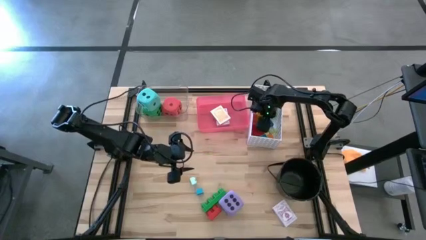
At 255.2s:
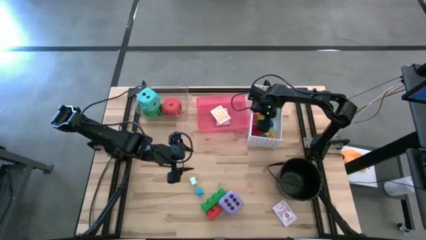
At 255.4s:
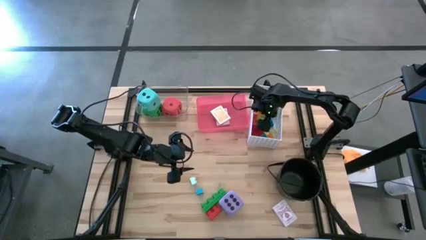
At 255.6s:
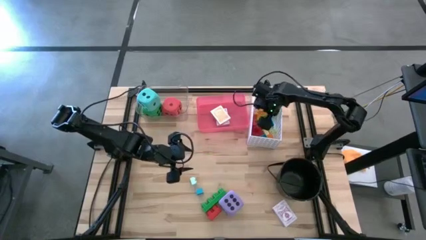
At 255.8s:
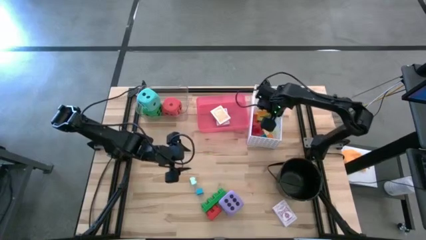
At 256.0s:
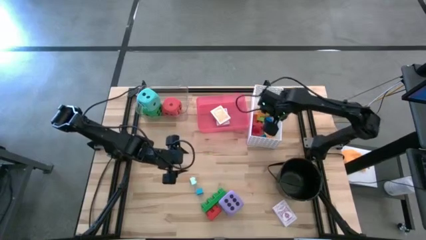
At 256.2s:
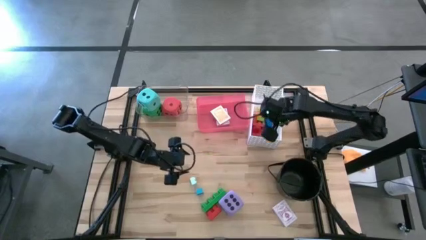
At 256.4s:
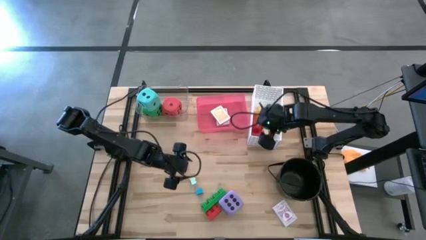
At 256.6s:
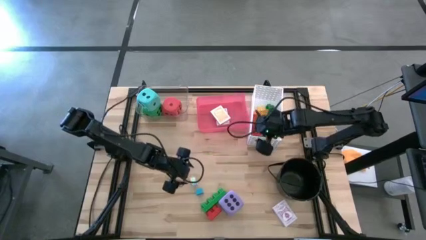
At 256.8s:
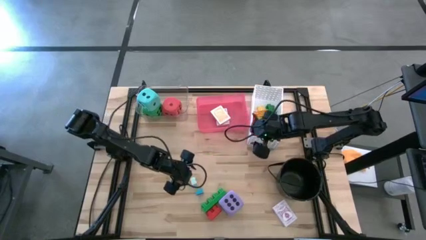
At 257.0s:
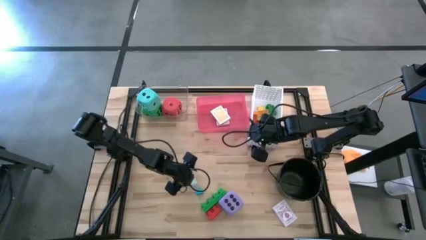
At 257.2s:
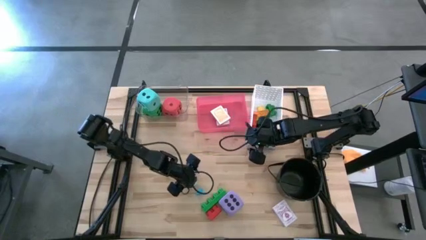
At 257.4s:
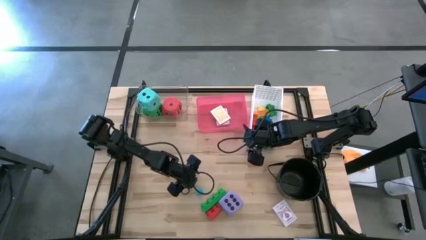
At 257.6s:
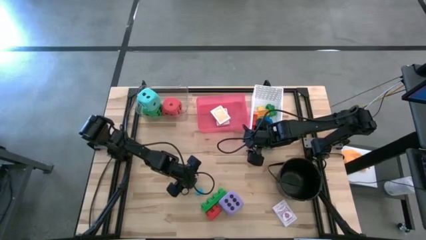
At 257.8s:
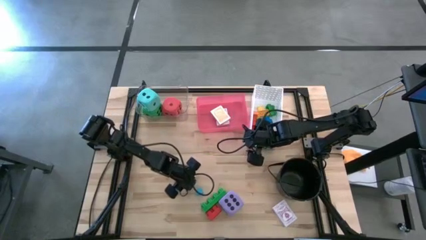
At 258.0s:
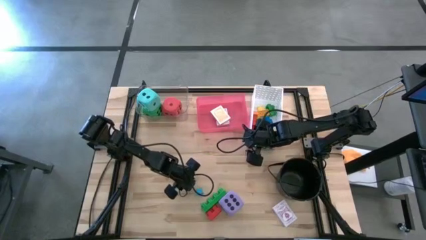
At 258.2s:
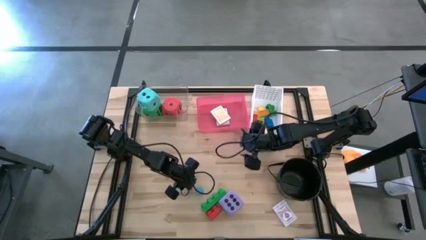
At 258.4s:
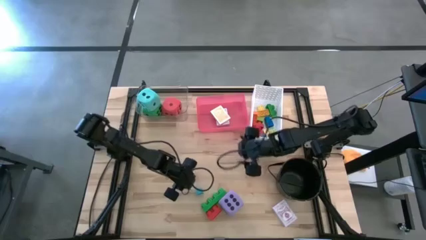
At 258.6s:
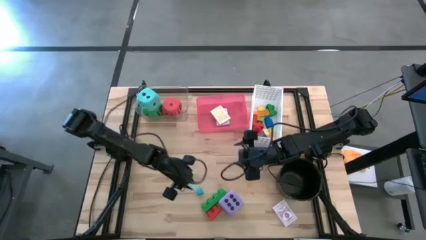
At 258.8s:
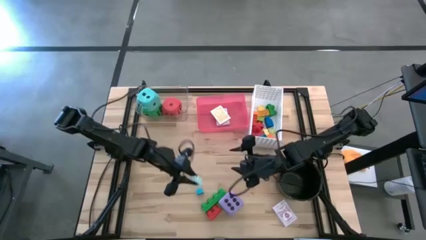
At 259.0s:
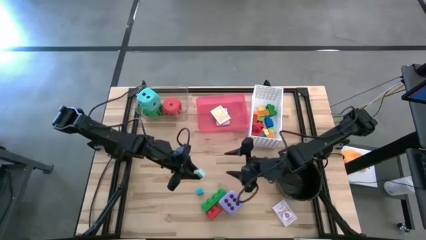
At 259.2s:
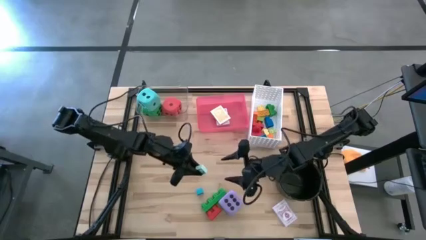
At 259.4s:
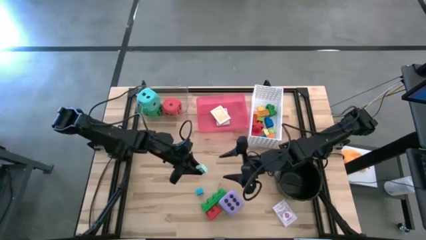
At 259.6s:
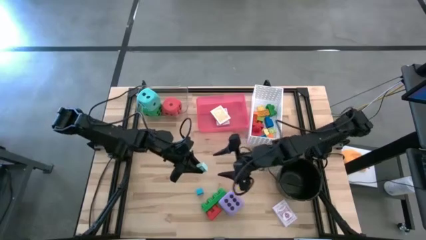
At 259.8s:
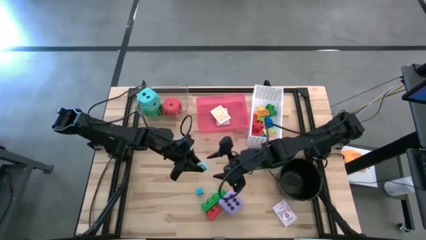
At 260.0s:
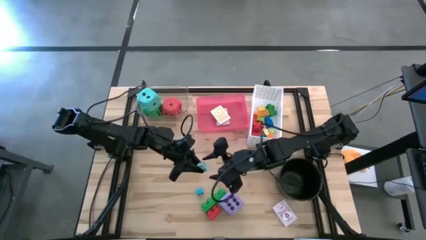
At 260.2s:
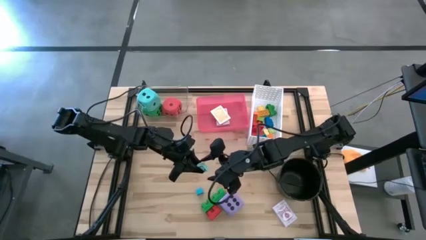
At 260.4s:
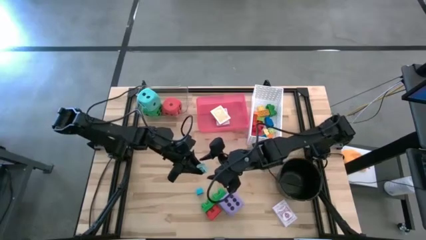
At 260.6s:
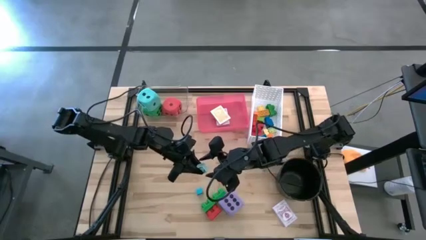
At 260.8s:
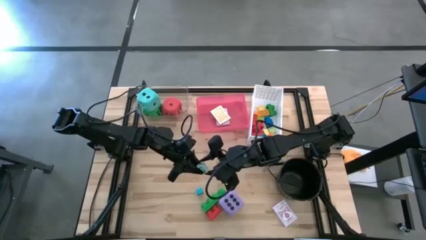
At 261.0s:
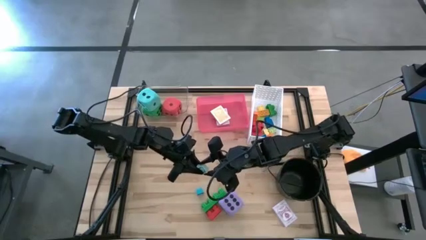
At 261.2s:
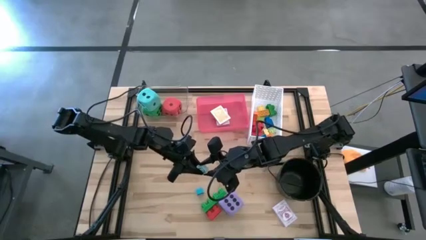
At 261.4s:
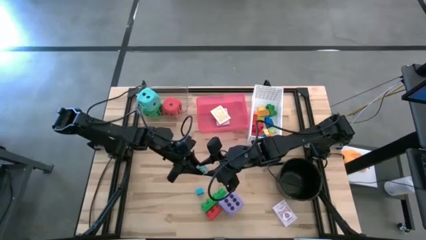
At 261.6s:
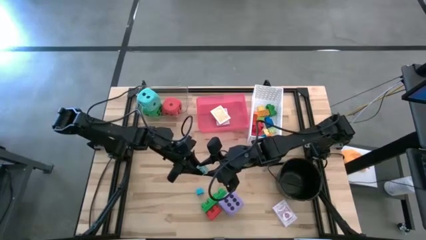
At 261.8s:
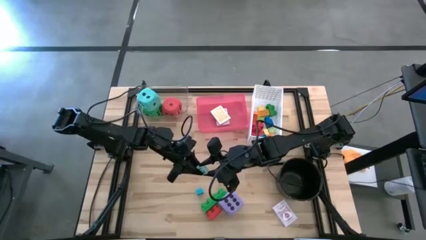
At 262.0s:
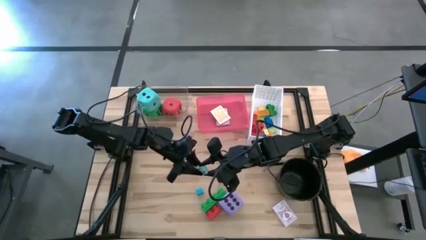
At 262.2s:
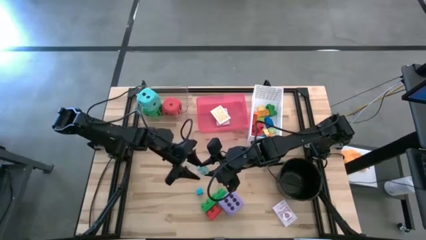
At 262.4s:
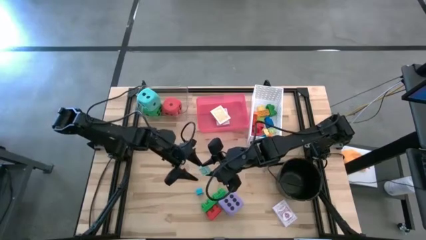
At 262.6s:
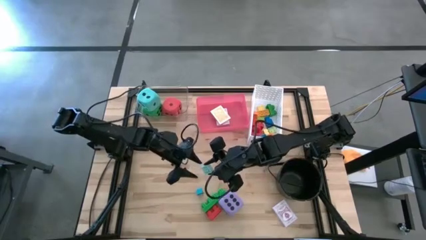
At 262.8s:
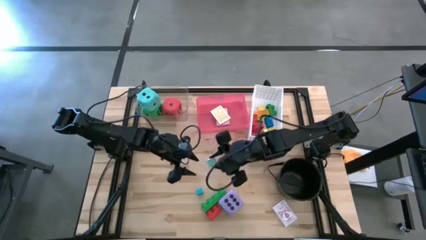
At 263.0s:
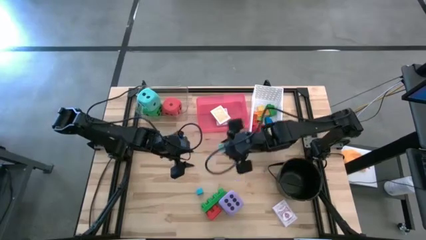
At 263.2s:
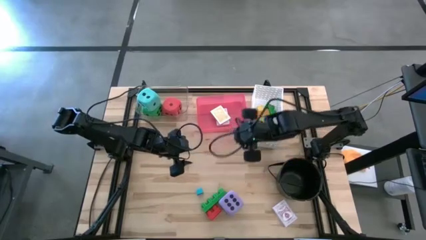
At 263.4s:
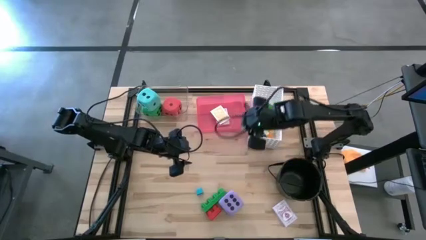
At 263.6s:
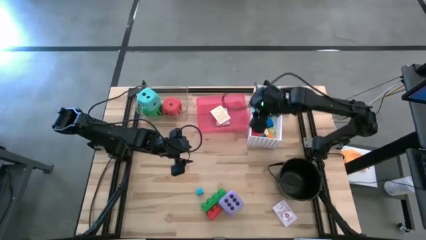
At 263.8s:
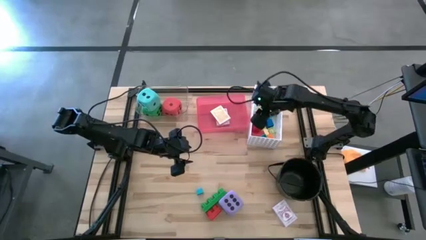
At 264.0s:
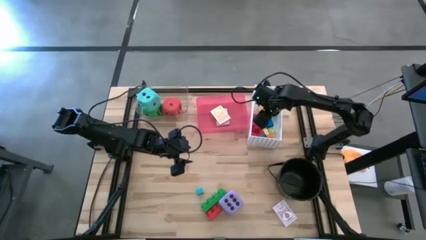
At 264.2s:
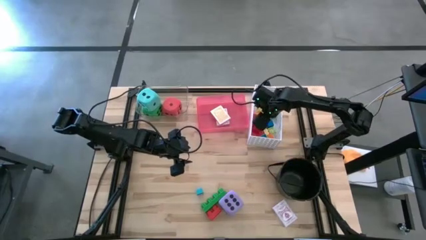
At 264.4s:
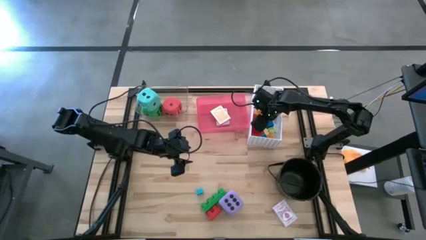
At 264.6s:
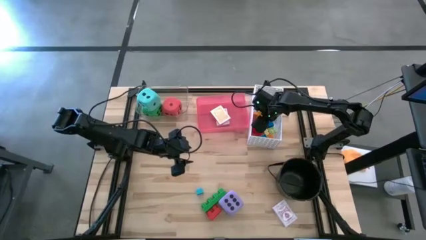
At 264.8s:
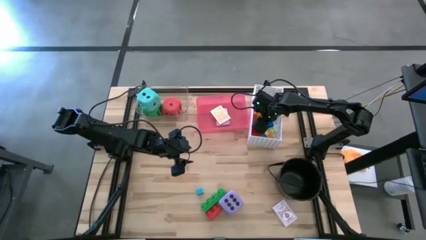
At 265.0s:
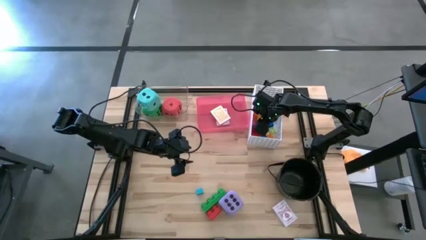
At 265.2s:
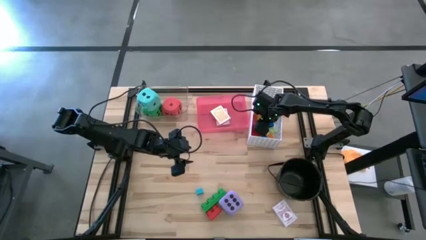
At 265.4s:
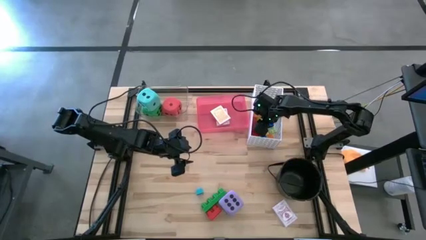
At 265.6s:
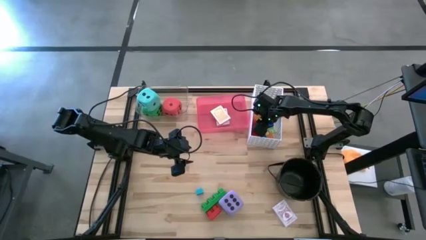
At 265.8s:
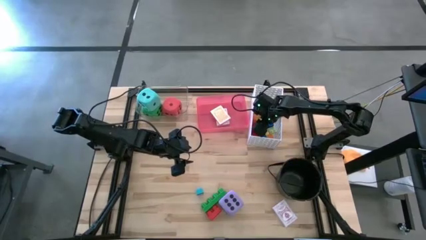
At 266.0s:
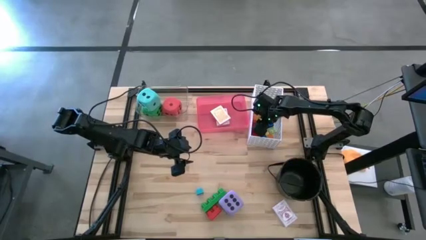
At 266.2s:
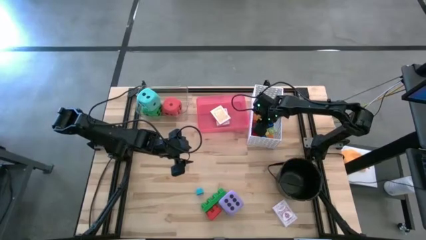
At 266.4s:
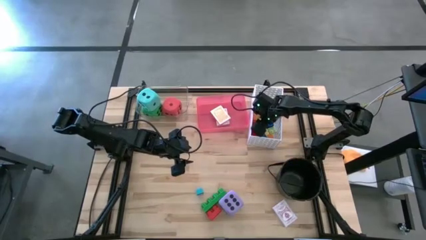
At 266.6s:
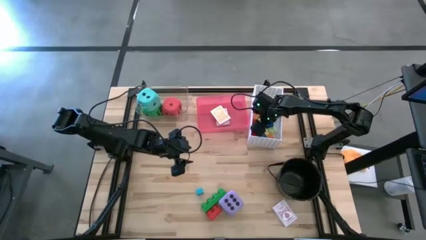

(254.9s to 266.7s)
Task: Pick & Place Toys
Put the small light blue game piece into the white bin

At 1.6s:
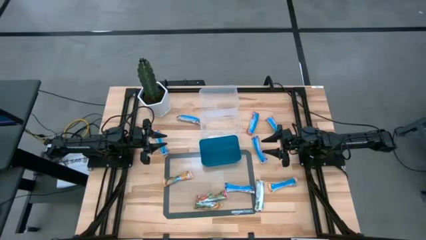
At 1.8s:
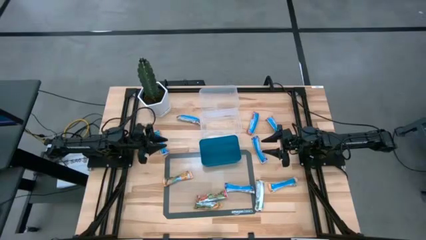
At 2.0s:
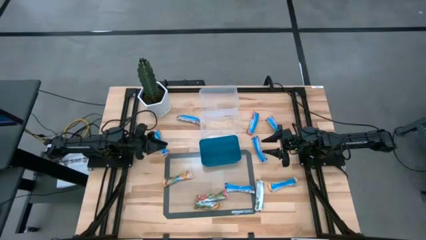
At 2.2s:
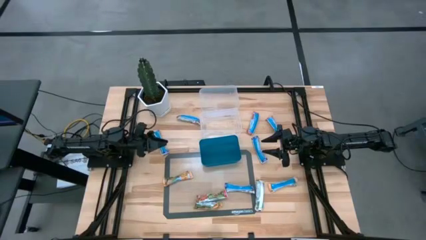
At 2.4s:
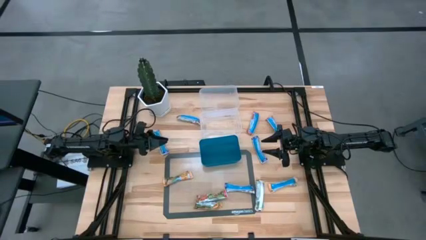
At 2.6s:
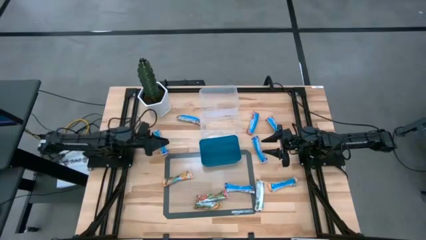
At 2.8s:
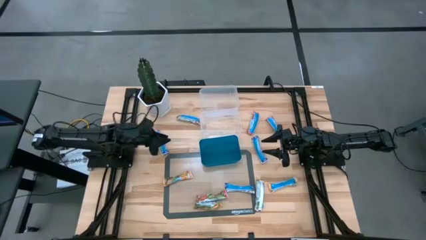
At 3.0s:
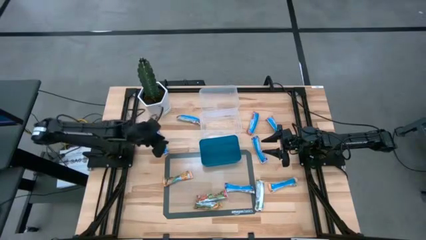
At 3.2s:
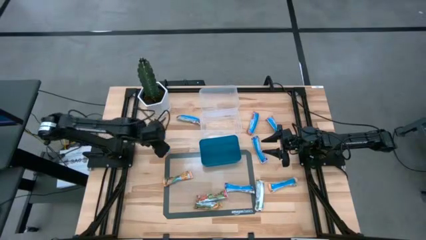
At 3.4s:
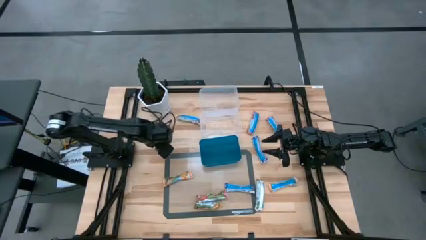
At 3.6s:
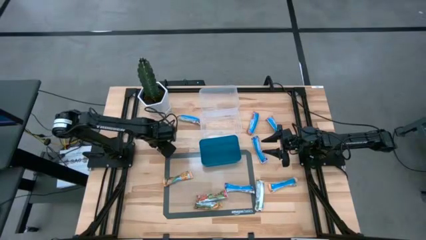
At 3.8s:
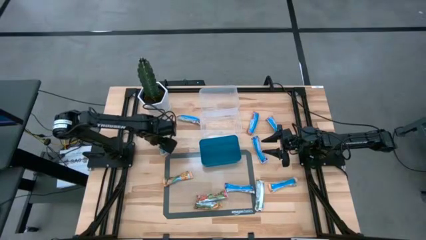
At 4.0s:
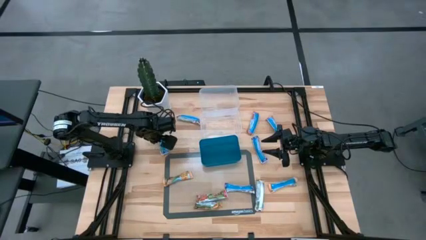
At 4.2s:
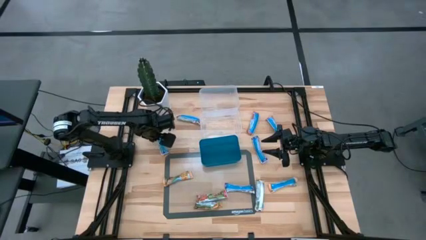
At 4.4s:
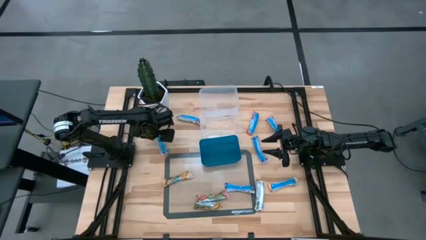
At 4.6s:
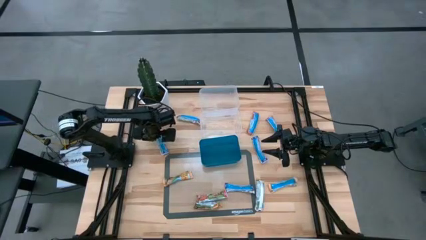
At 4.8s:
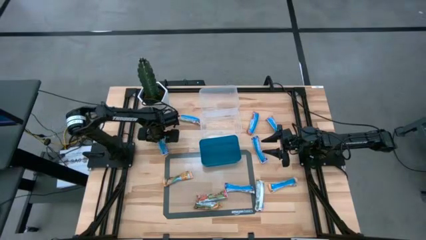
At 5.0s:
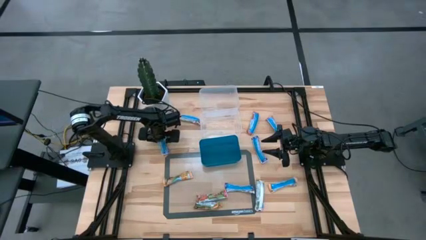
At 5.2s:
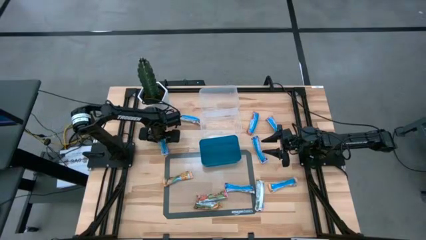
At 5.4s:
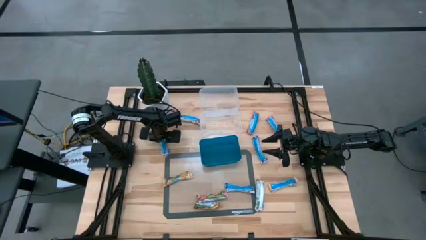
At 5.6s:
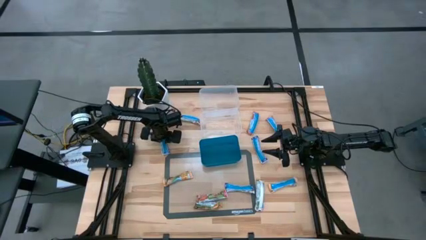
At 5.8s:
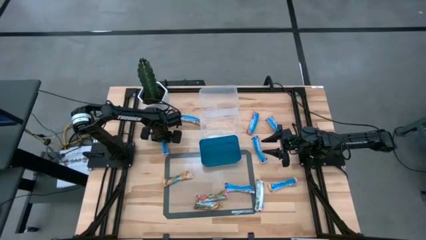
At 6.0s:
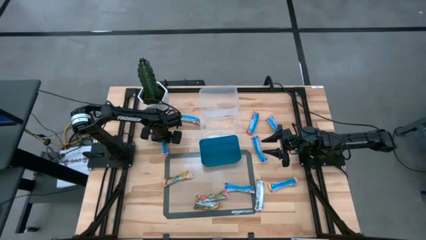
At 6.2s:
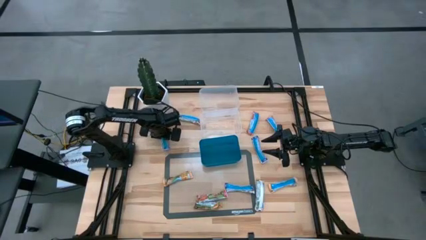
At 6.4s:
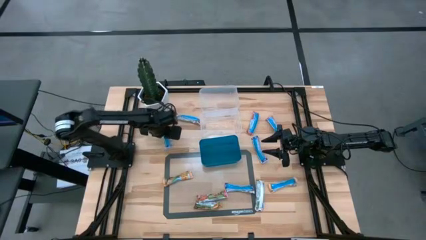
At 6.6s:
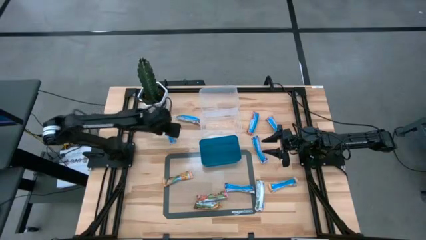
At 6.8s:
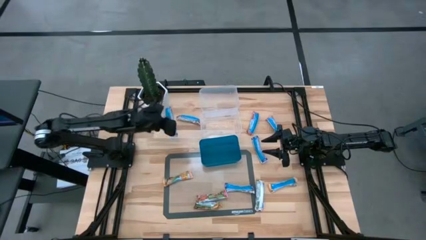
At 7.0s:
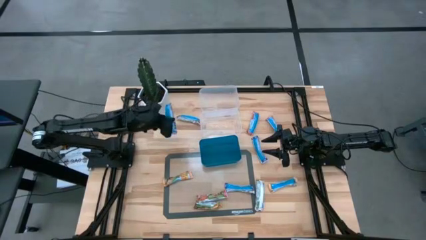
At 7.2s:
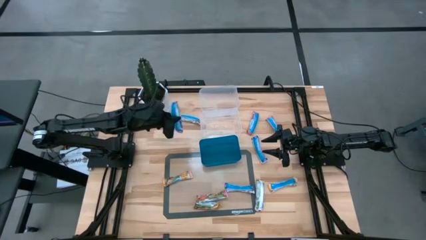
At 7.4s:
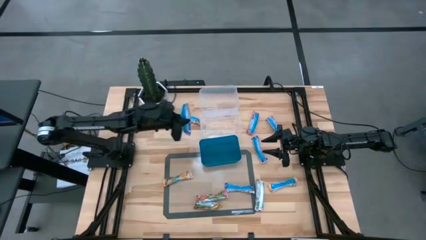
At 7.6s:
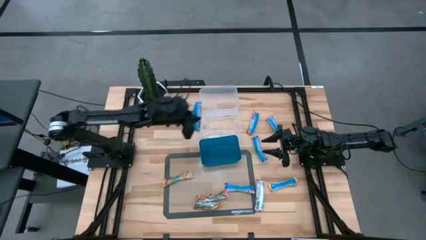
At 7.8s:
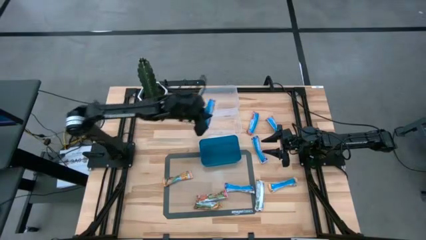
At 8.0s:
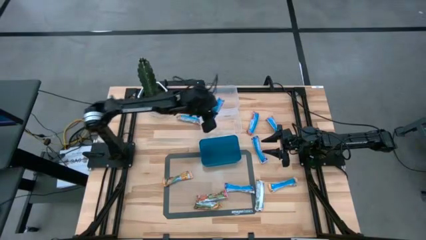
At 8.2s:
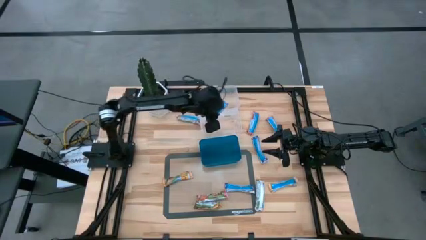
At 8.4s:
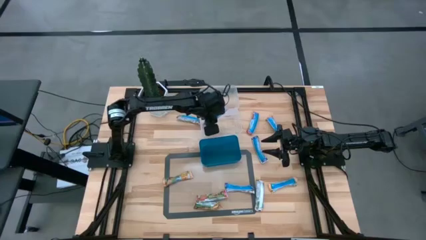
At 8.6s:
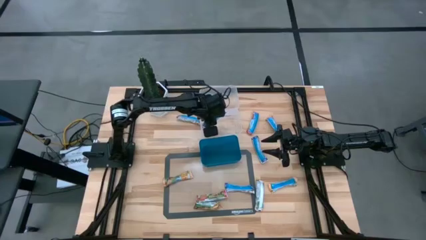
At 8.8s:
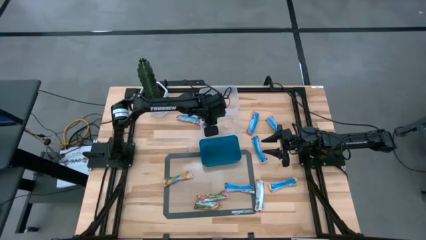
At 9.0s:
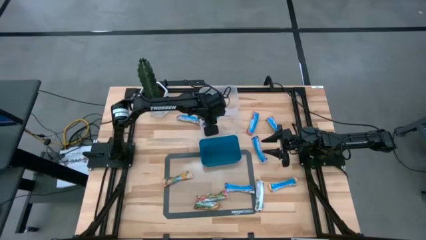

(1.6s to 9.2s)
Task: Pick and place Granola Bars by type
Put the blue granola bar into the bottom transparent bin
